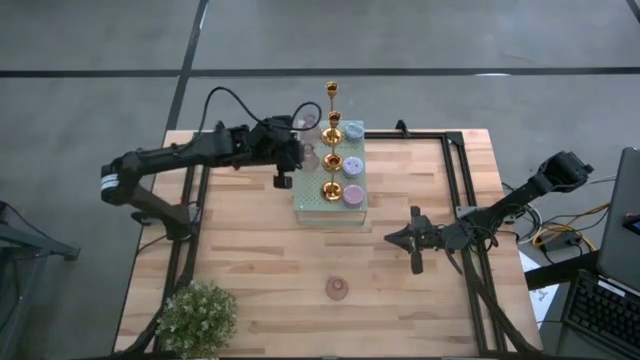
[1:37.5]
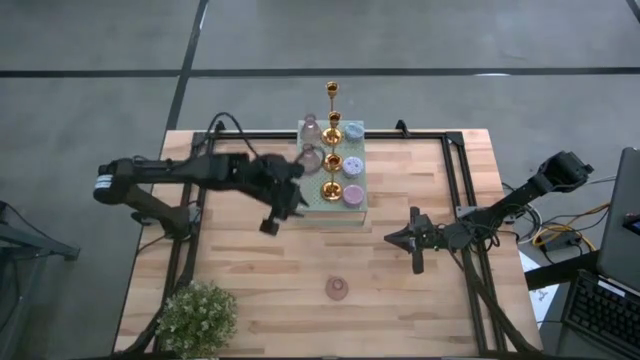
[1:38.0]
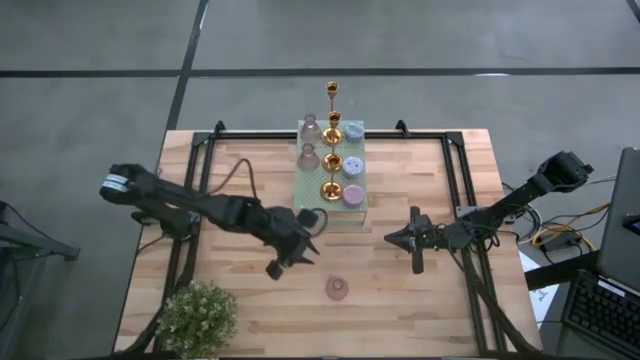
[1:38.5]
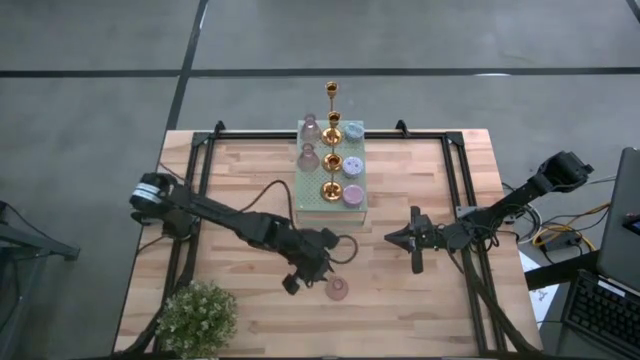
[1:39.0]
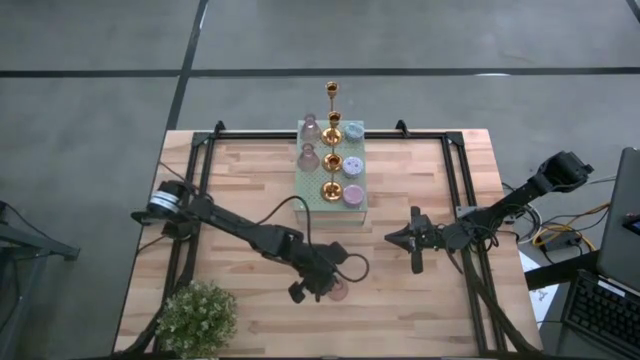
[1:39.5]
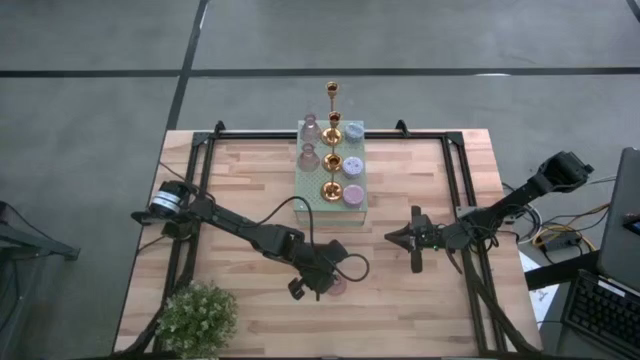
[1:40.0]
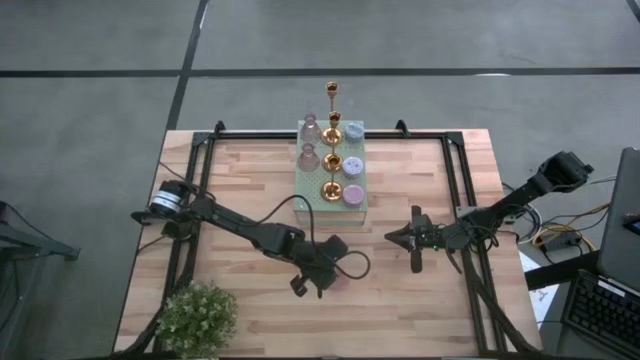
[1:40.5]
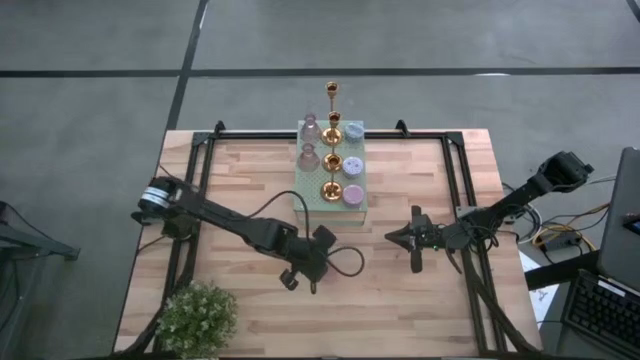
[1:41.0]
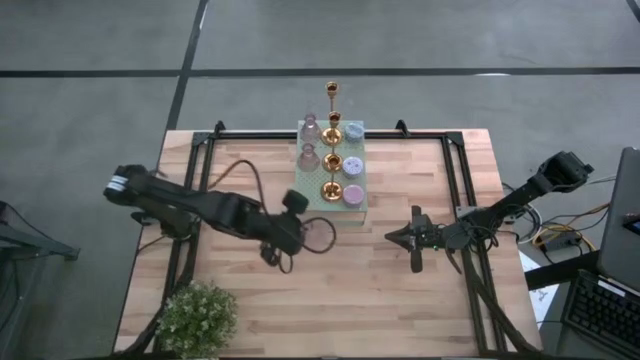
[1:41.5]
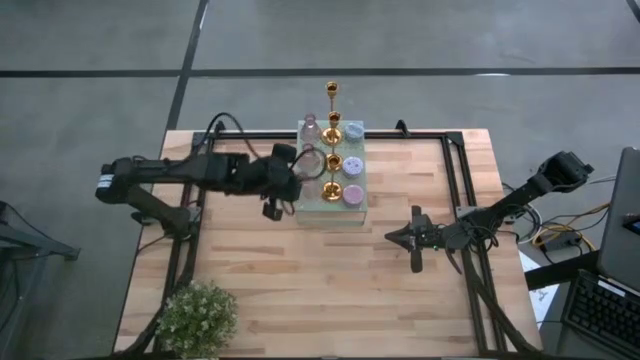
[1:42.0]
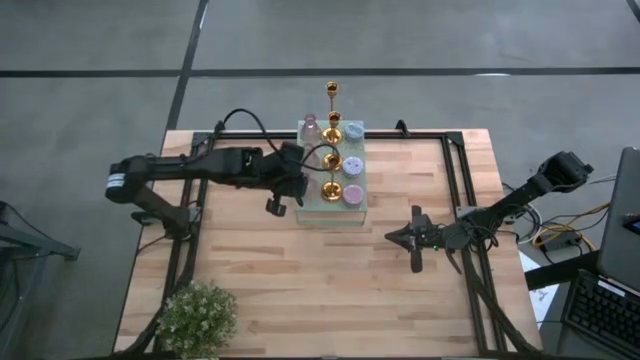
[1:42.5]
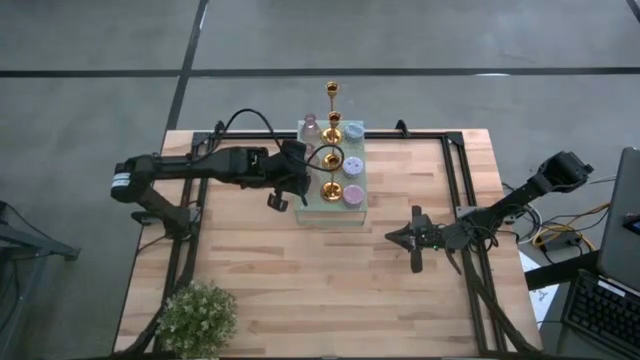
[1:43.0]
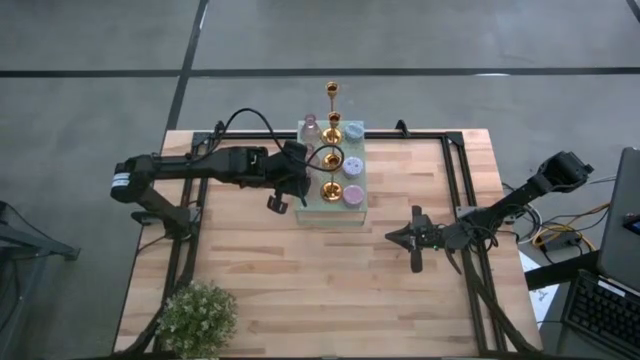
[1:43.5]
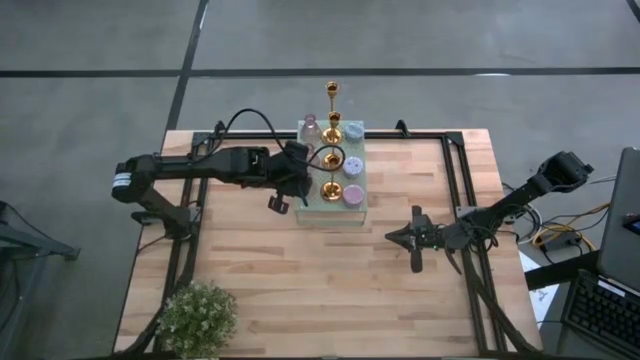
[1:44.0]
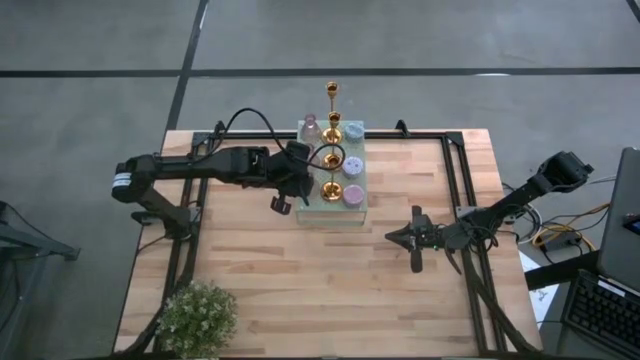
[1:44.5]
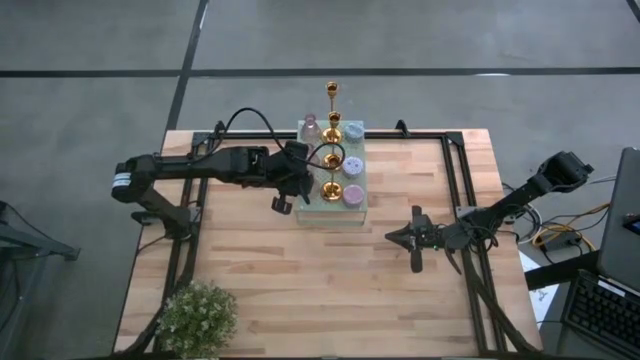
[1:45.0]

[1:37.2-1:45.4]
Task: Pick & Place candle stick holders
Put the pink glass candle holder on the shelf aligned with the other pink glass candle holders

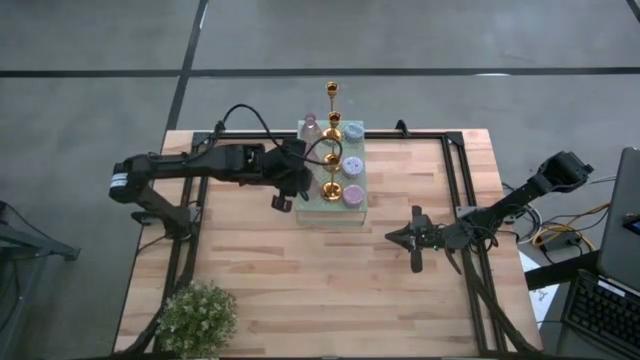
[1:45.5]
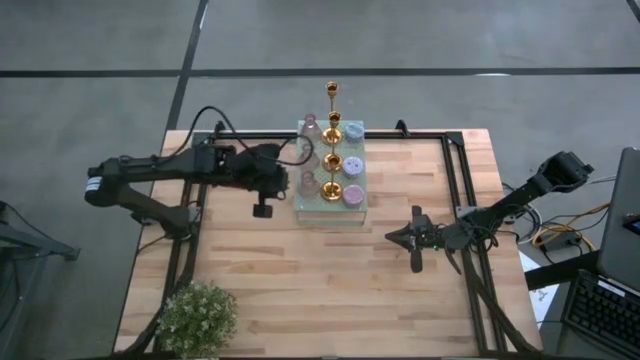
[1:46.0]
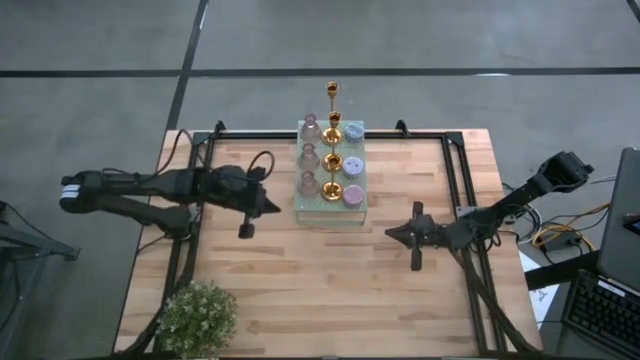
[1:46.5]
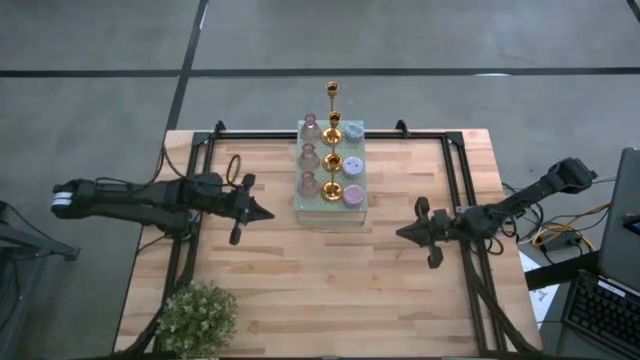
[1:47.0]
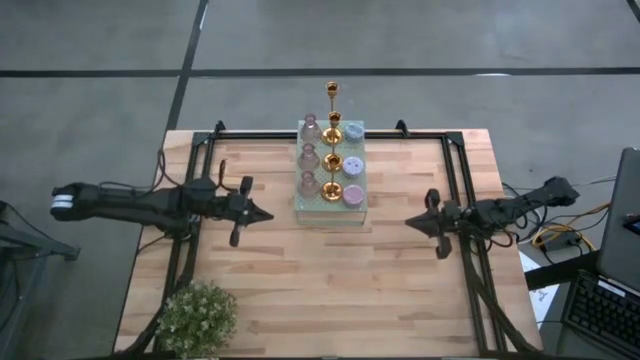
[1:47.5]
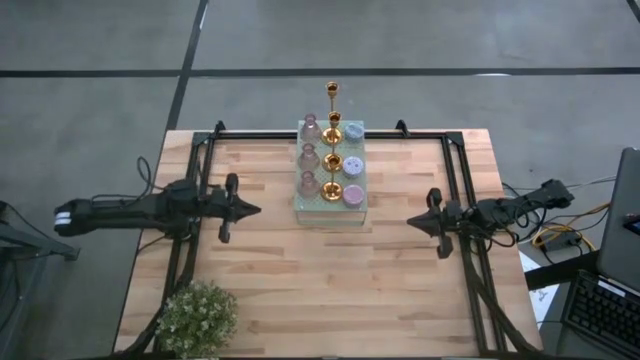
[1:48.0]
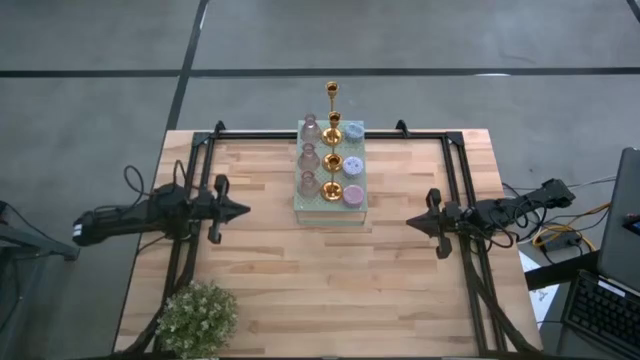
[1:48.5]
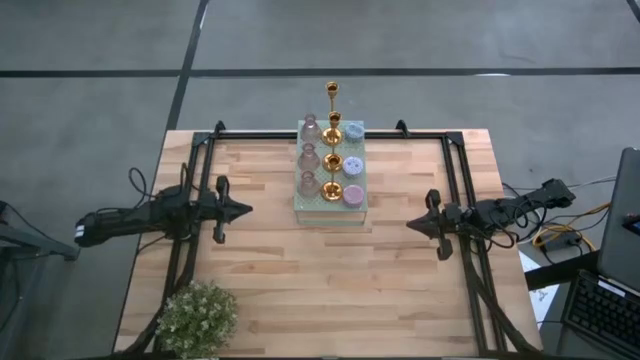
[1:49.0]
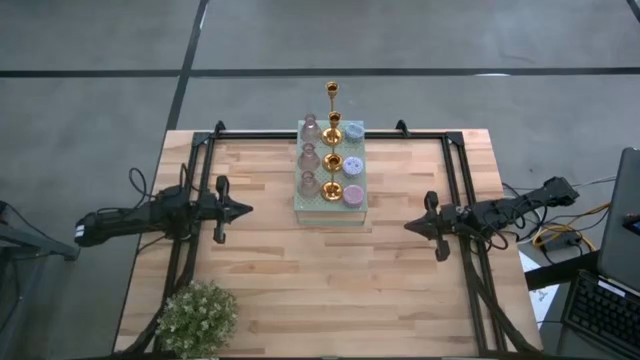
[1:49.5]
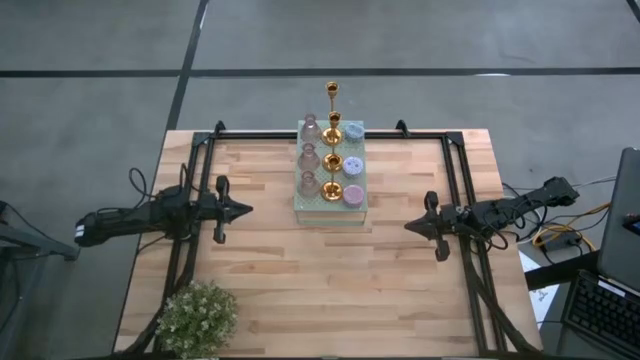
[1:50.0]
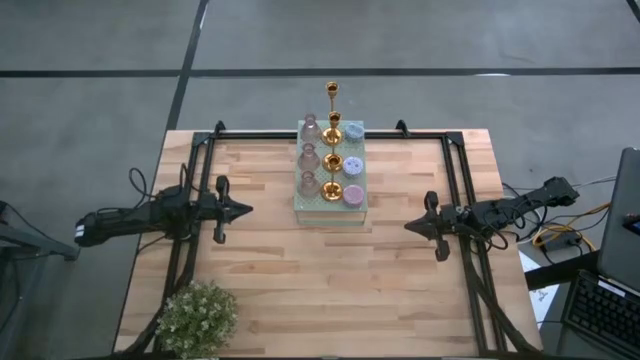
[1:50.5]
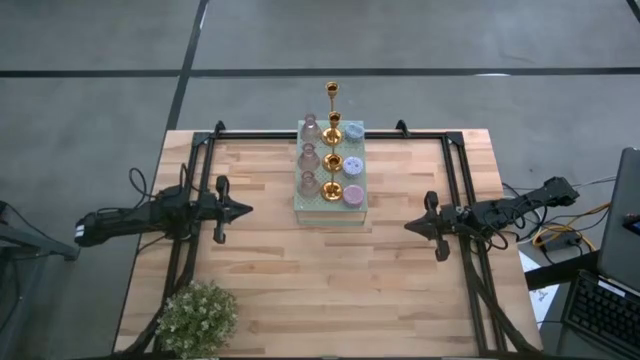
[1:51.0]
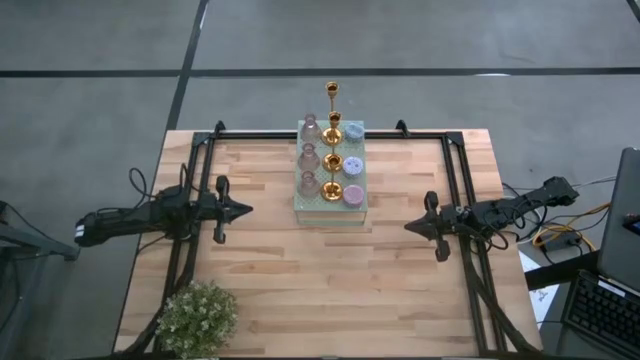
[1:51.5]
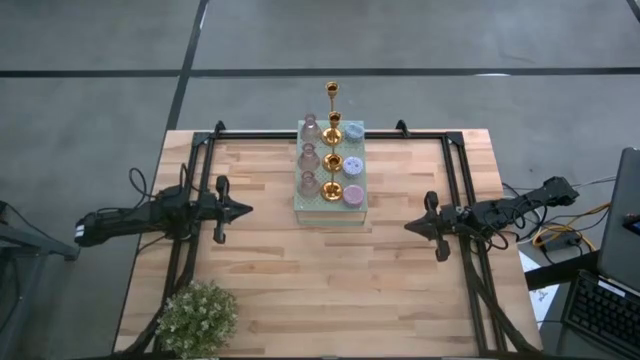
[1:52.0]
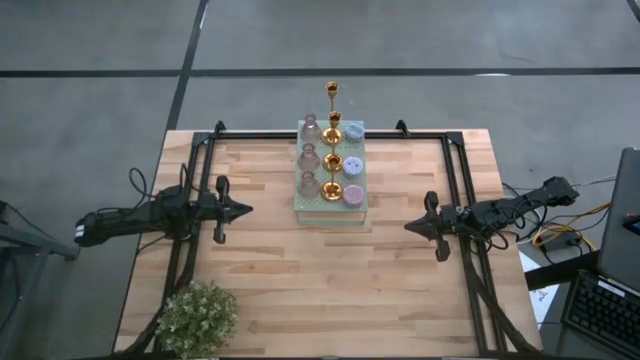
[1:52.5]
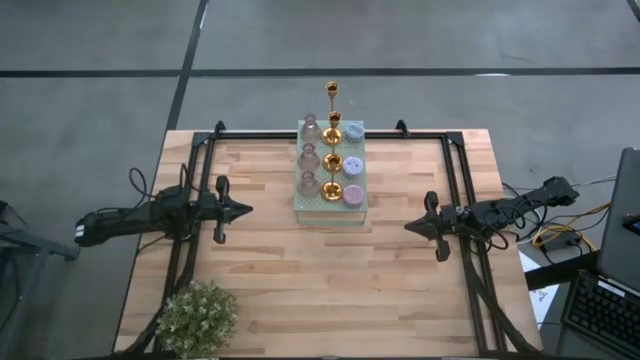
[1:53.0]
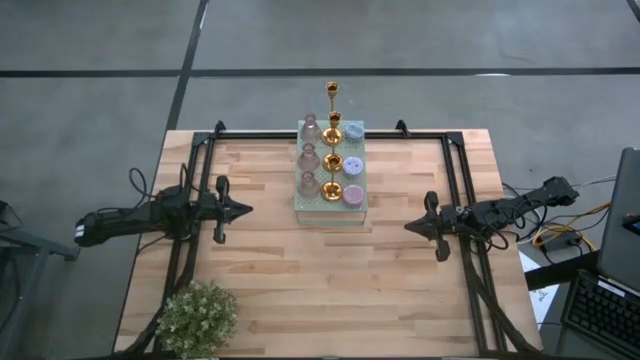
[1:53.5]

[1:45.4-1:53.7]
Return to Home Position

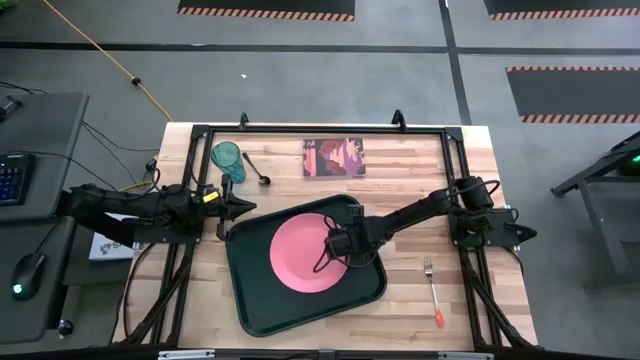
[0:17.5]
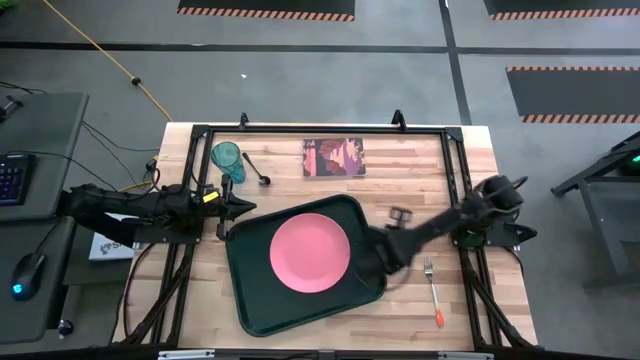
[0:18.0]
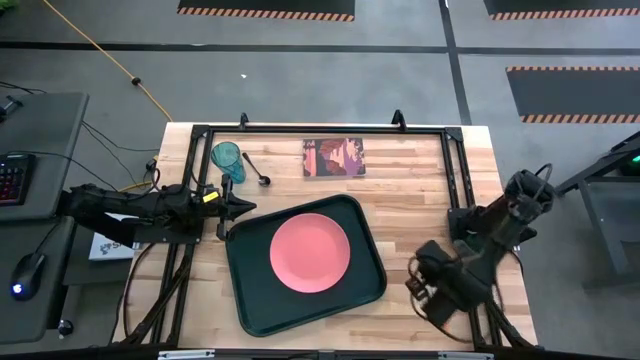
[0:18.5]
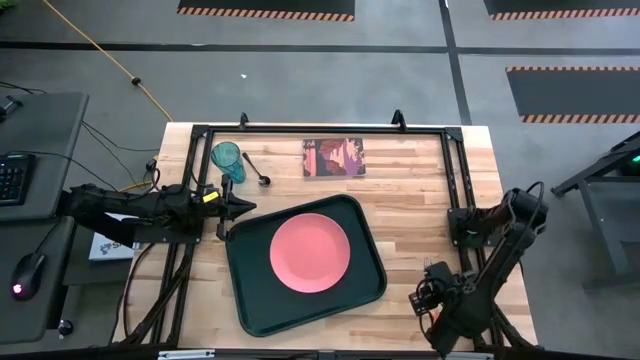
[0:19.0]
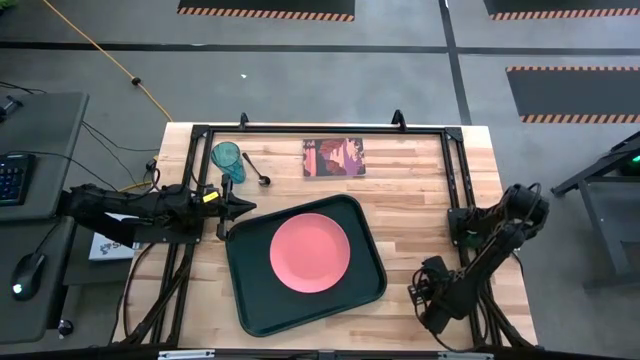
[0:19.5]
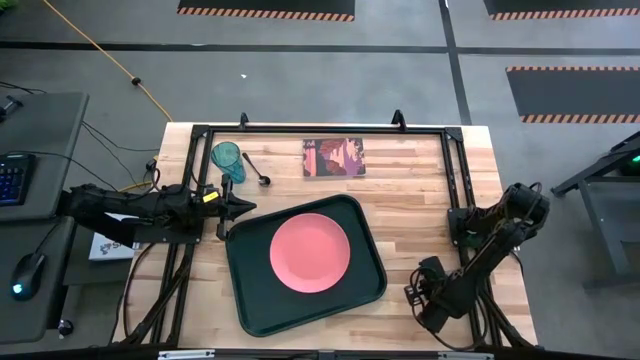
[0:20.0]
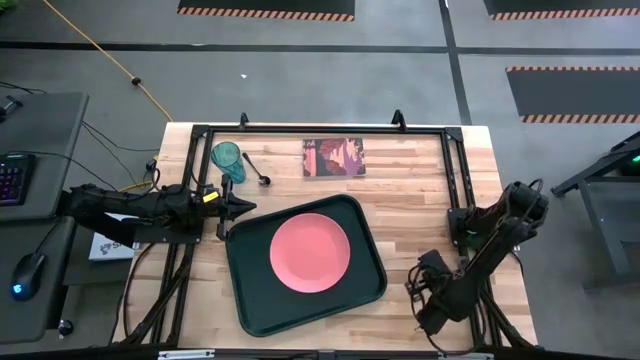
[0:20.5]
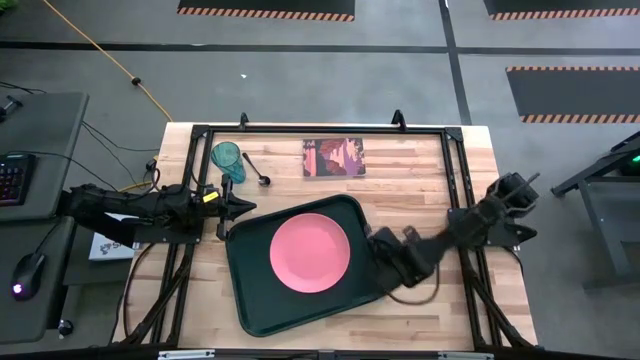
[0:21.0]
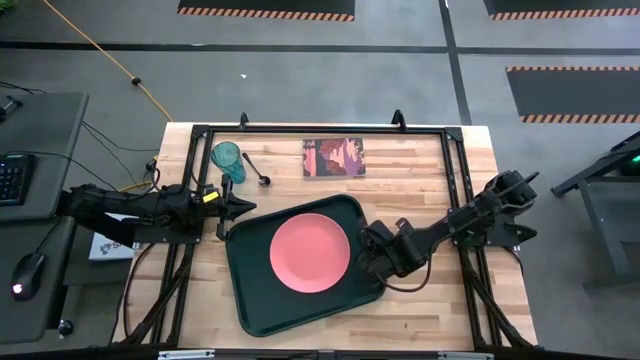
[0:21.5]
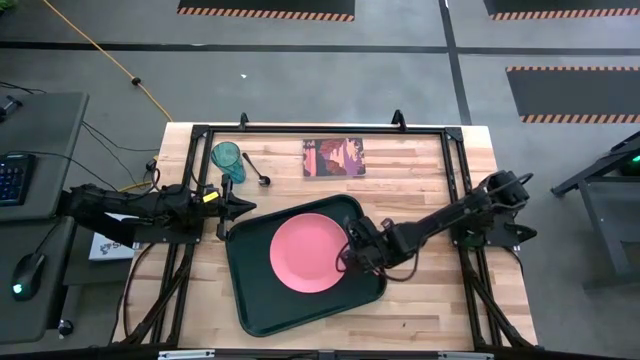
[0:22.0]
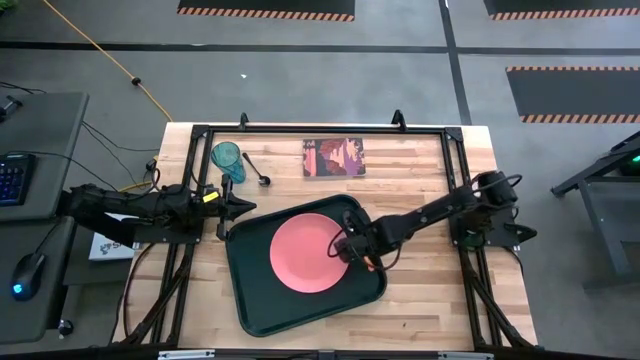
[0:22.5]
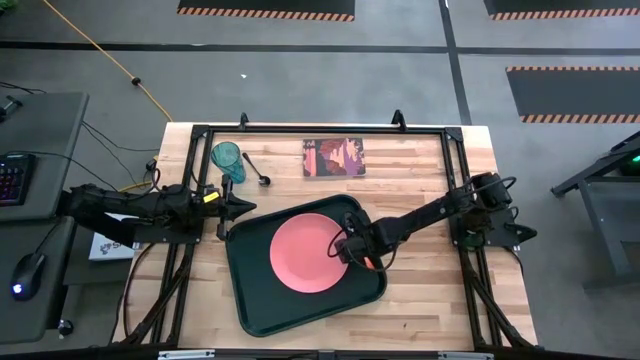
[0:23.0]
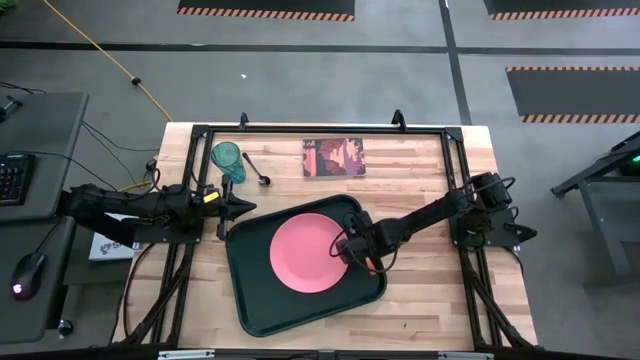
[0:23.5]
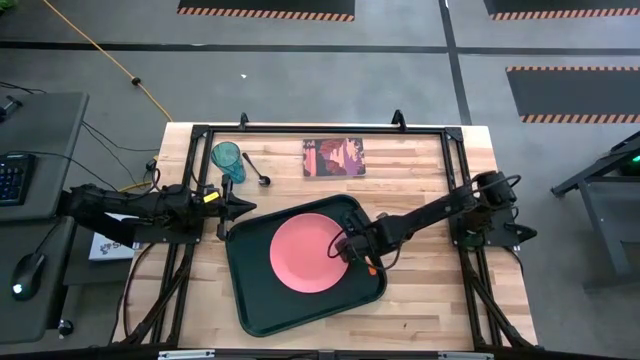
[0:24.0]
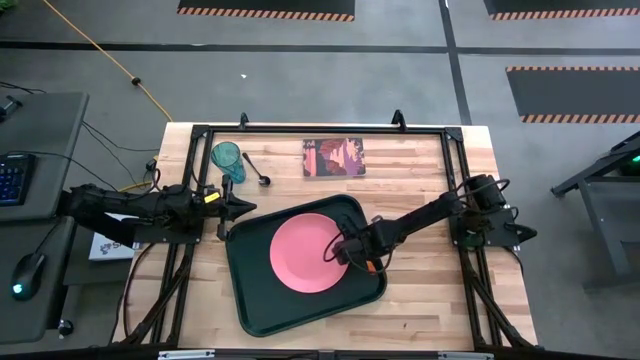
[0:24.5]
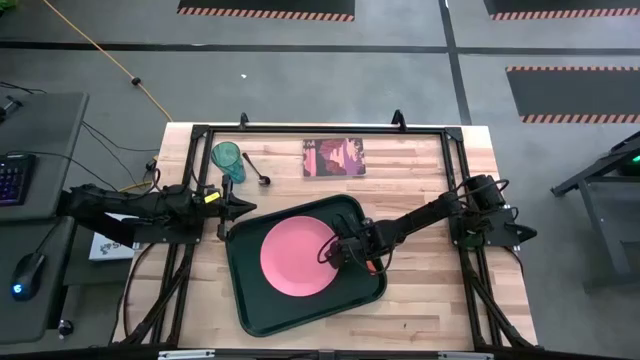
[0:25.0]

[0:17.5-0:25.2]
Task: Pick and place plate/cup/fork/spoon on tray
Put the orange fork on the black serving tray to the right of the pink plate
